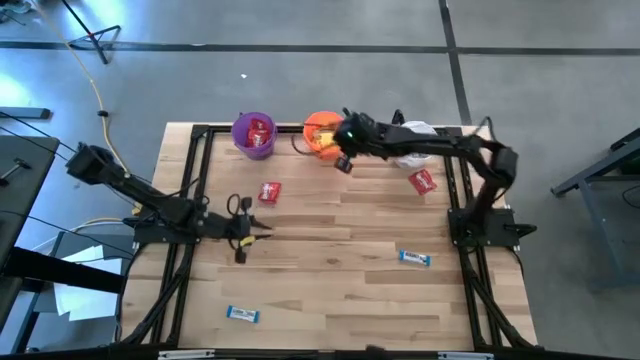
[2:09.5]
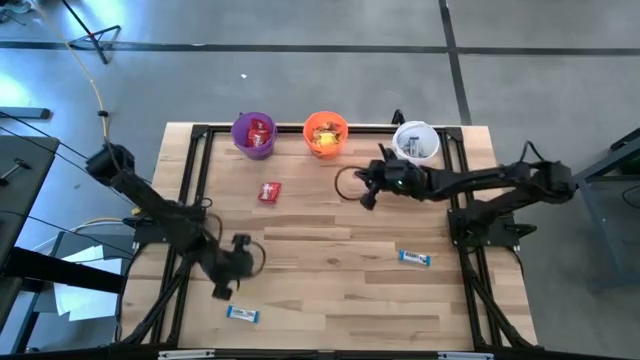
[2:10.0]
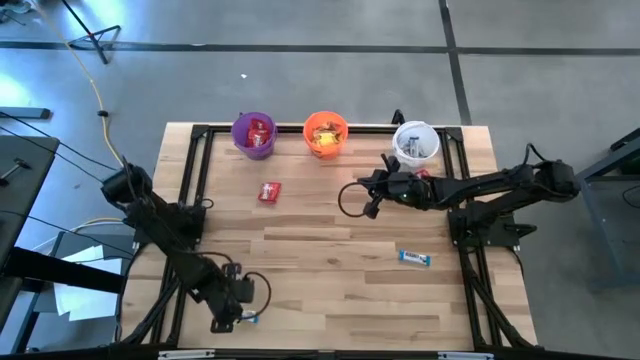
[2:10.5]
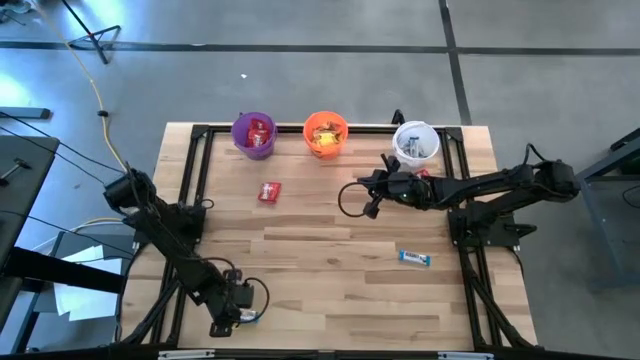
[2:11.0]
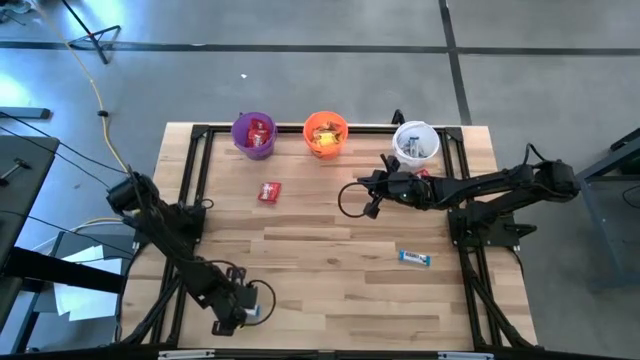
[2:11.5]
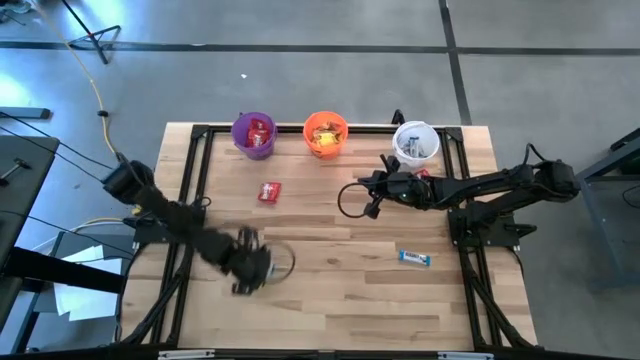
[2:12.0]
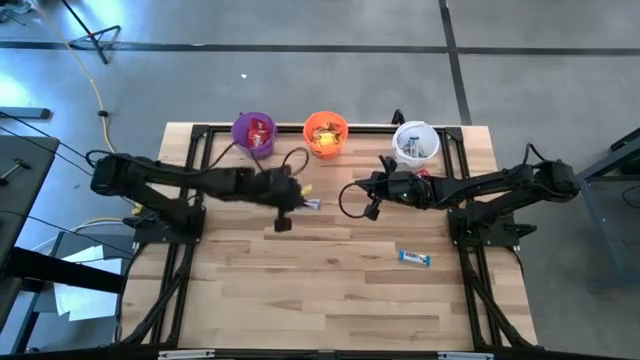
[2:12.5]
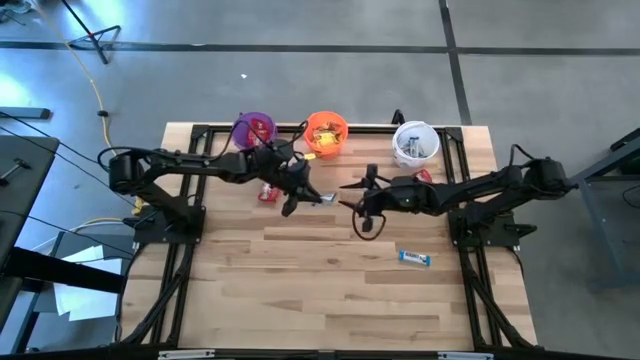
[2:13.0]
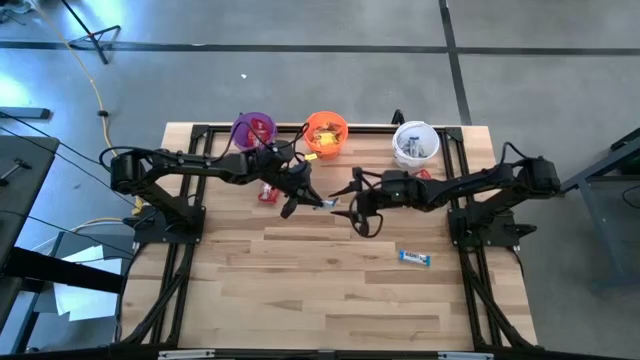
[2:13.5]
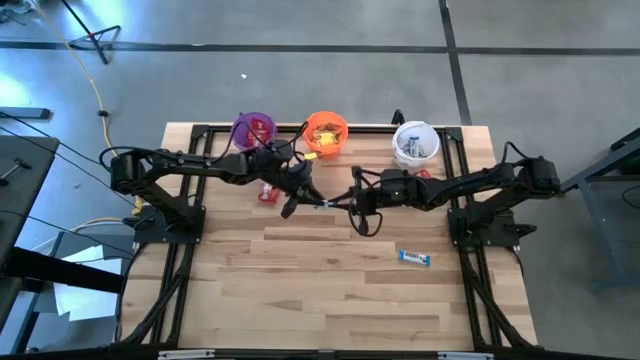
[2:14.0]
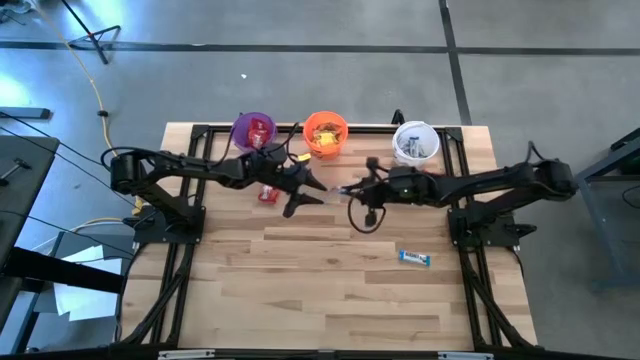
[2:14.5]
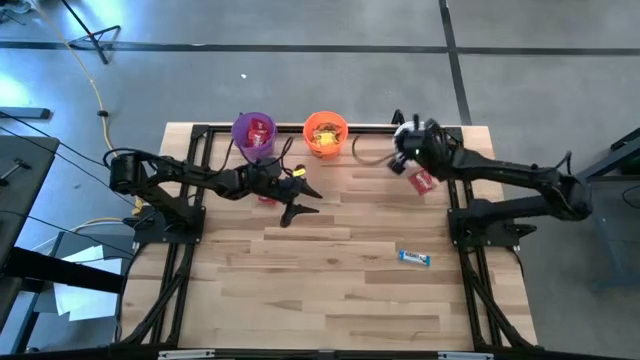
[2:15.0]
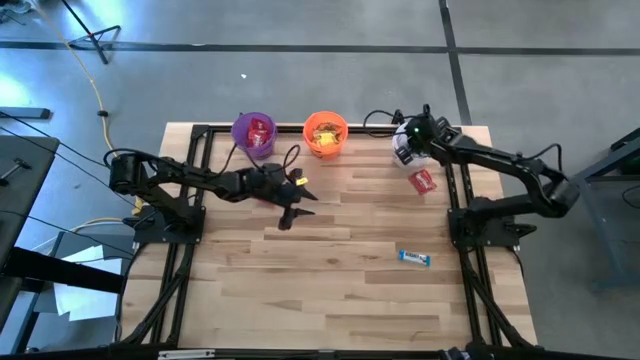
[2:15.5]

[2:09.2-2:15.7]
Task: Sort candy
Put the white chocolate bar into the white bucket

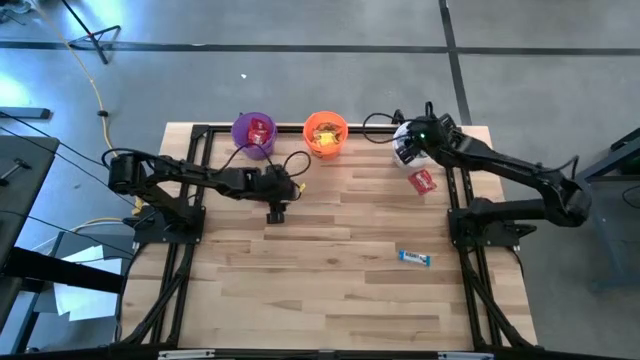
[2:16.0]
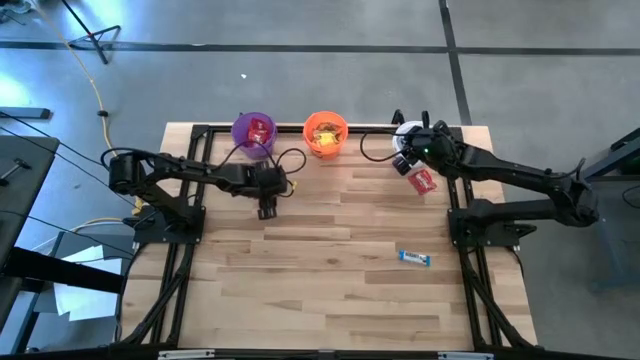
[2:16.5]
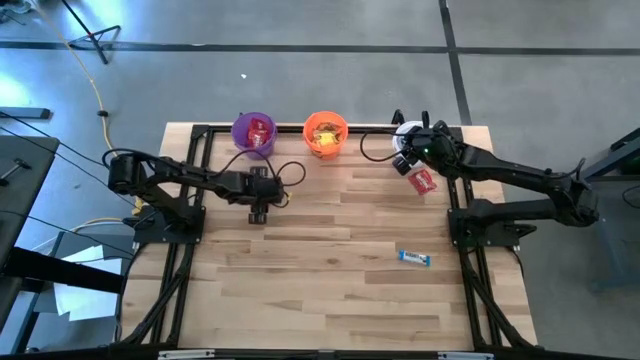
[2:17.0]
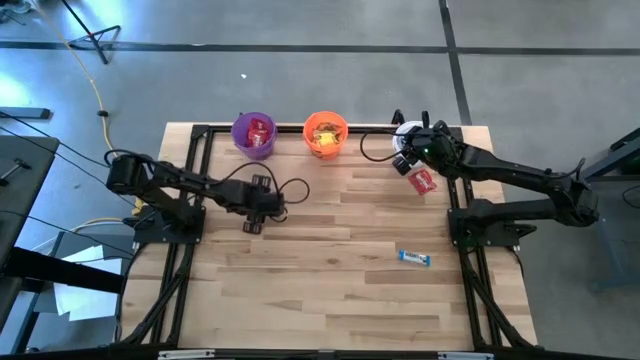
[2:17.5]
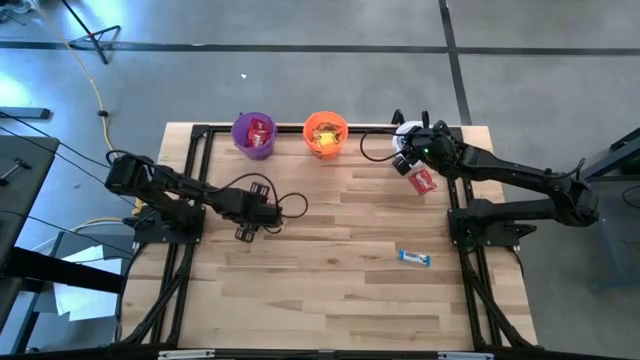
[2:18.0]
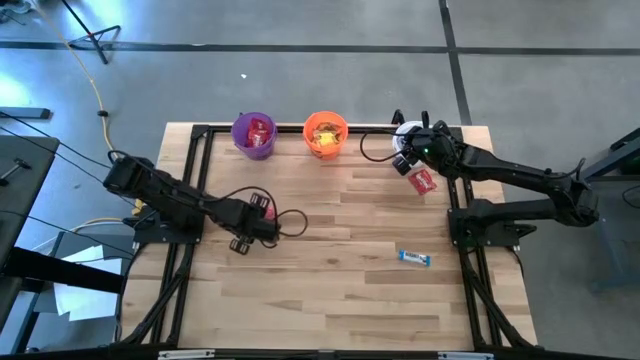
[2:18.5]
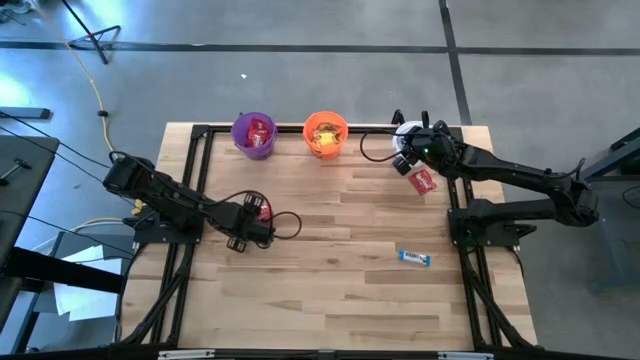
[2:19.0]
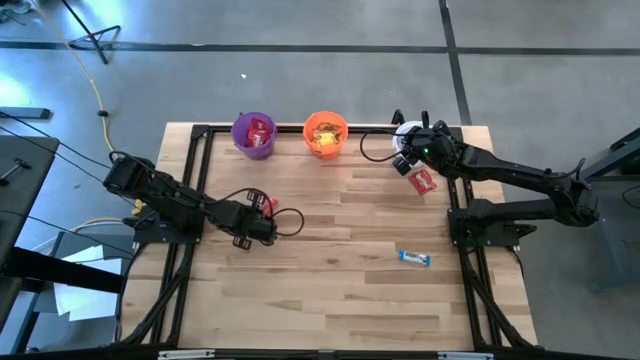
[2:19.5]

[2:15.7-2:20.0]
Put the red candy into the violet bucket

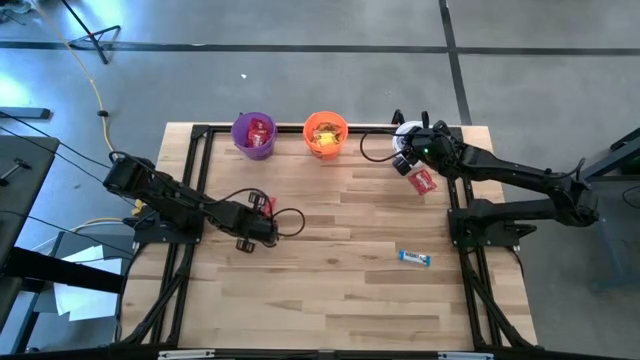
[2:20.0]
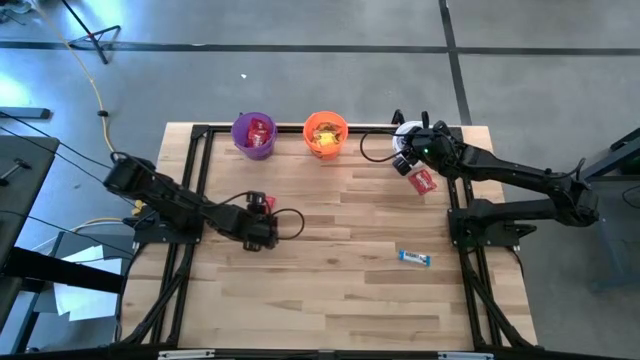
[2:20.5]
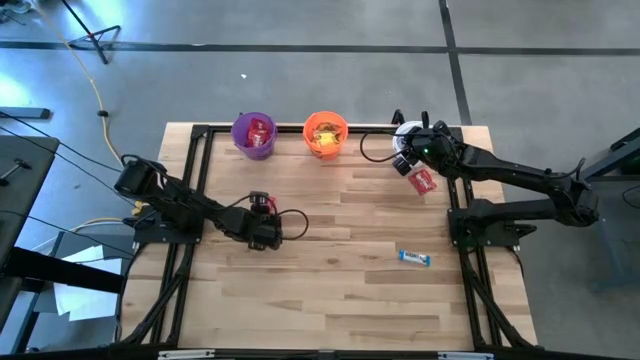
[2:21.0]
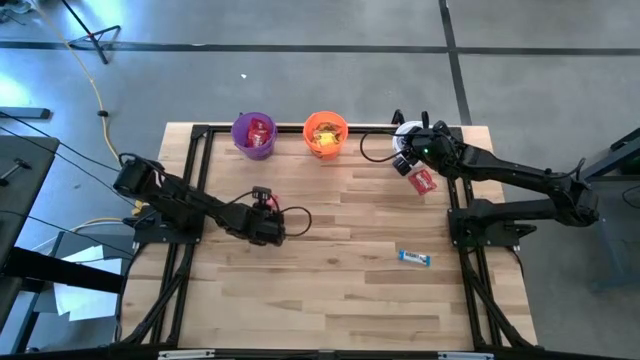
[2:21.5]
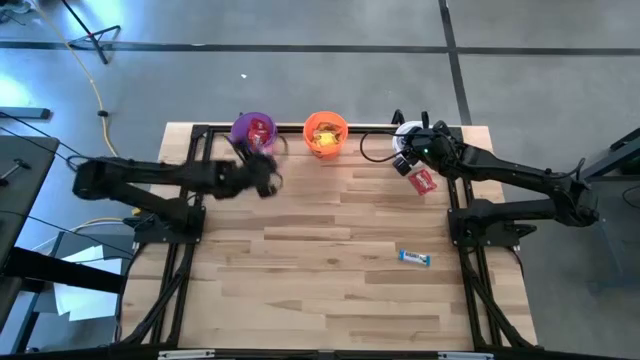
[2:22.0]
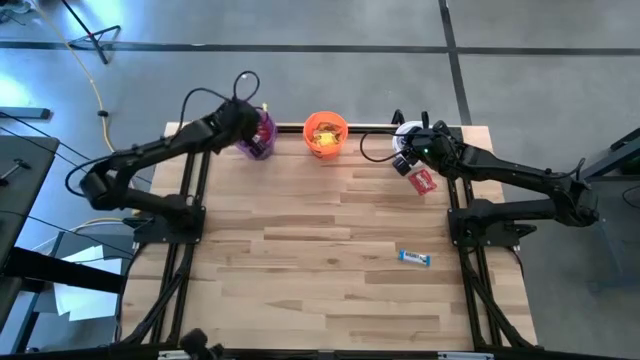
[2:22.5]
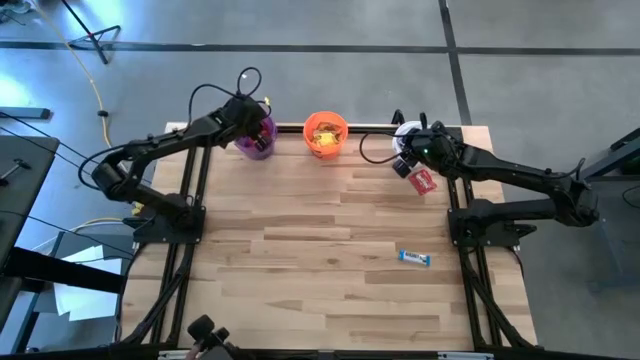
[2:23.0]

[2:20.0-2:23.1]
Put the red candy into the violet bucket

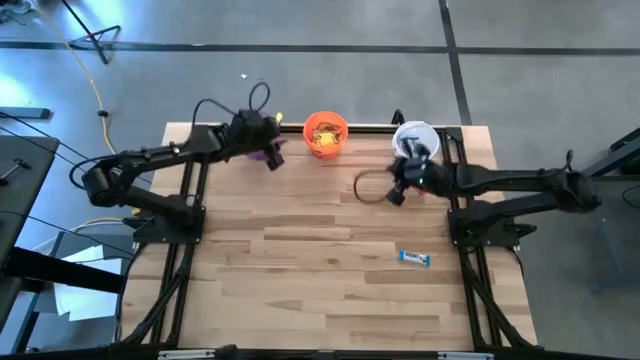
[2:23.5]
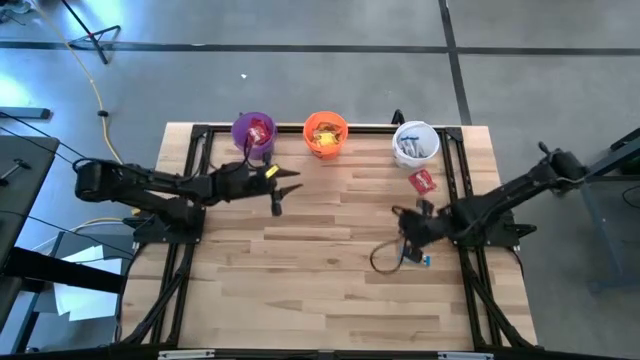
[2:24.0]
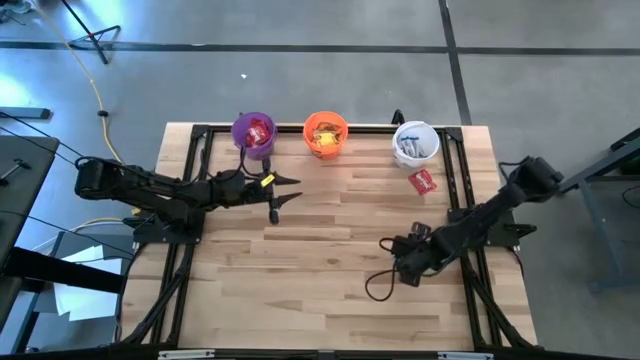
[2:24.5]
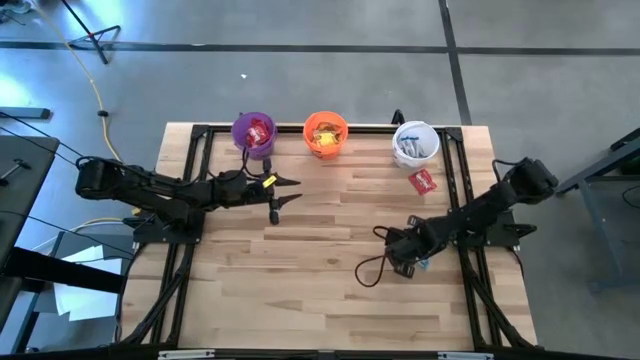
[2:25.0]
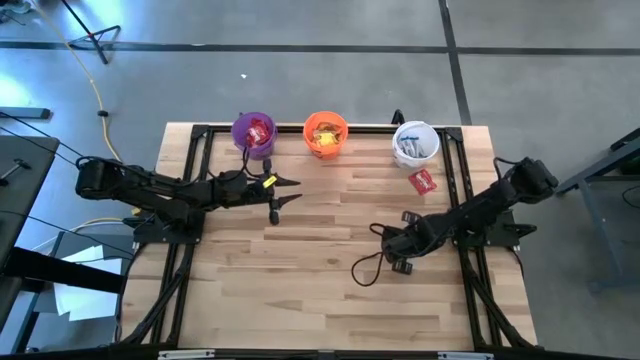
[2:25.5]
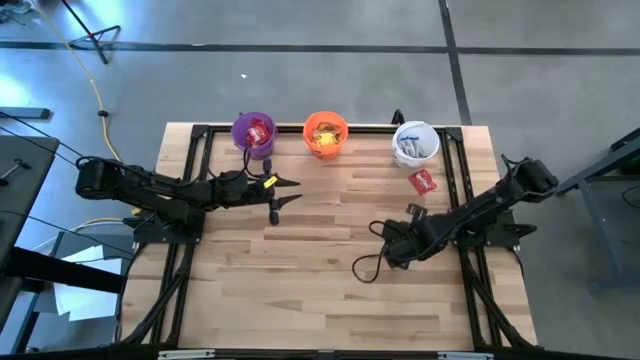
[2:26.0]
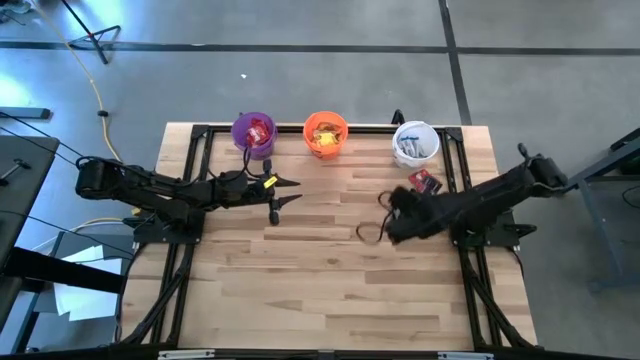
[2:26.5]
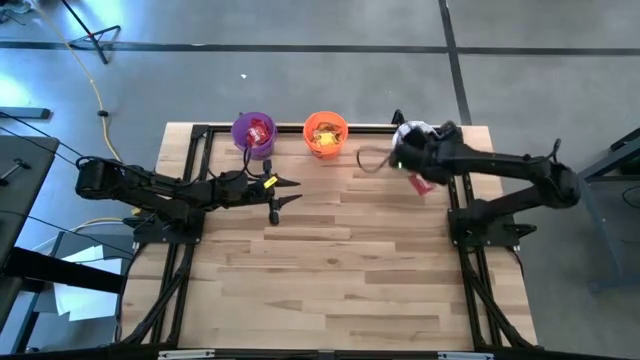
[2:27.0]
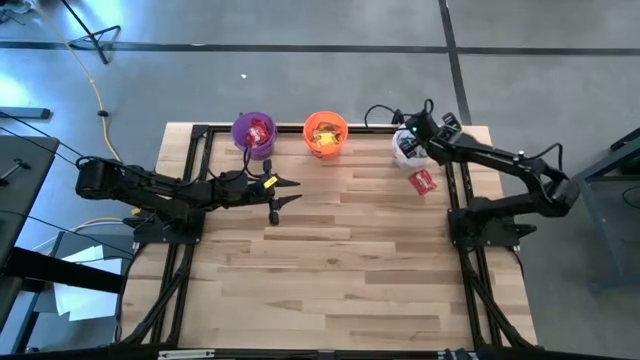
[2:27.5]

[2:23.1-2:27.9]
Put the white bar chocolate into the white bucket

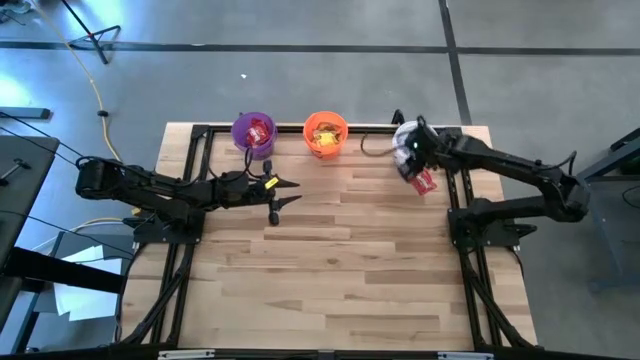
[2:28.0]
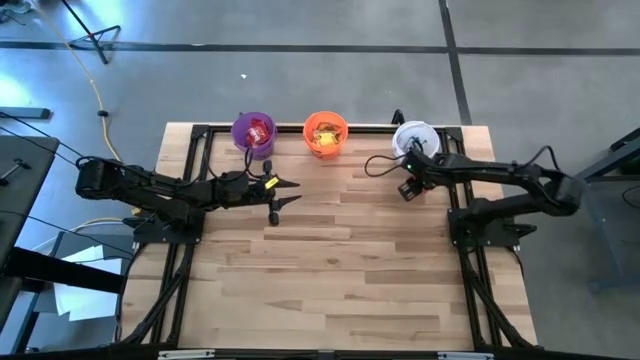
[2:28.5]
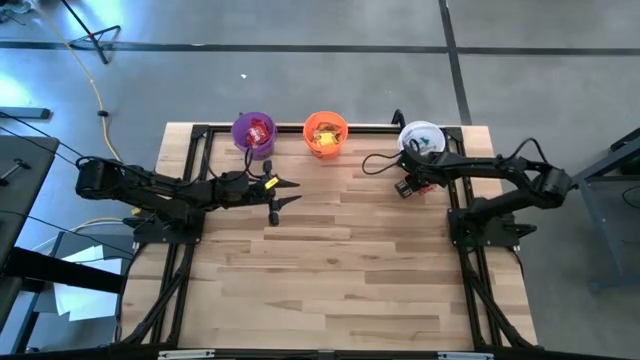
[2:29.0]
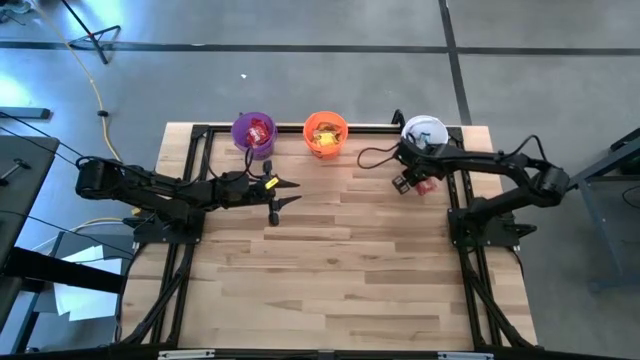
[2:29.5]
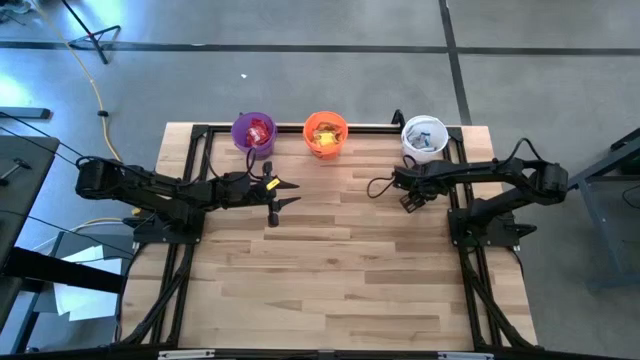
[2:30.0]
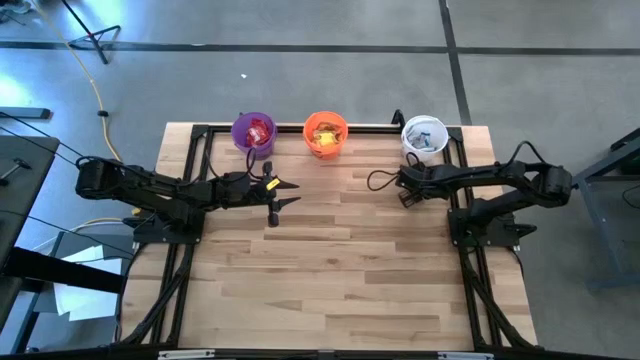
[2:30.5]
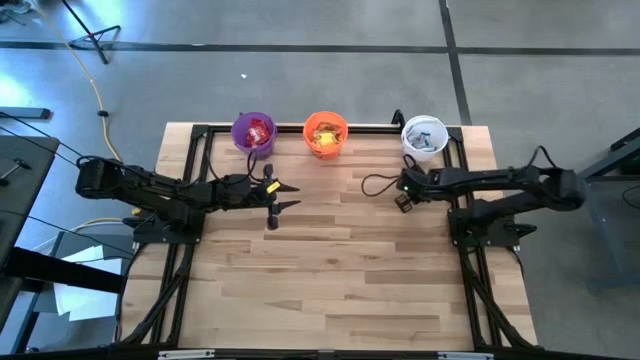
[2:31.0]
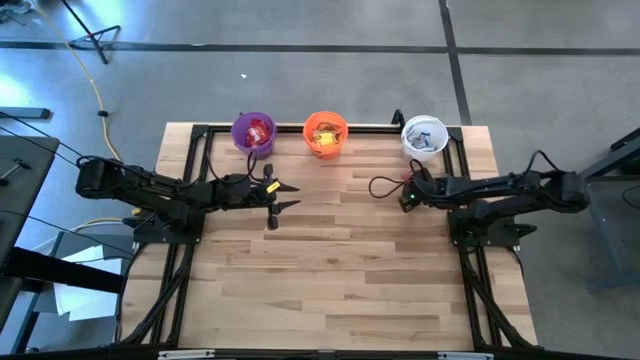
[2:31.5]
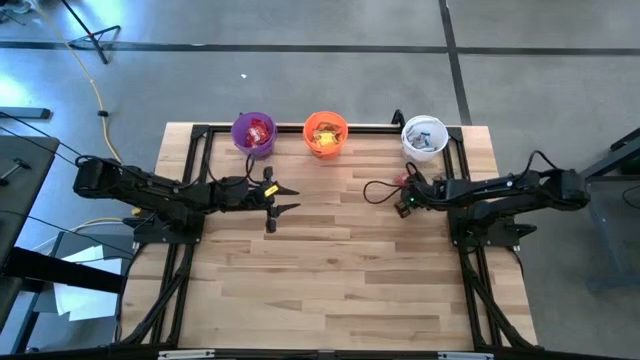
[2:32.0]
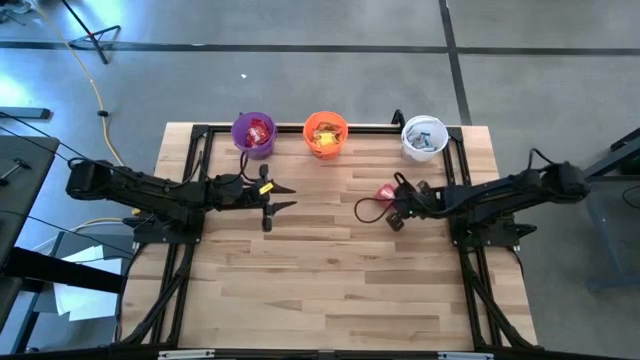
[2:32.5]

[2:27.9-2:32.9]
Put the red candy into the violet bucket
